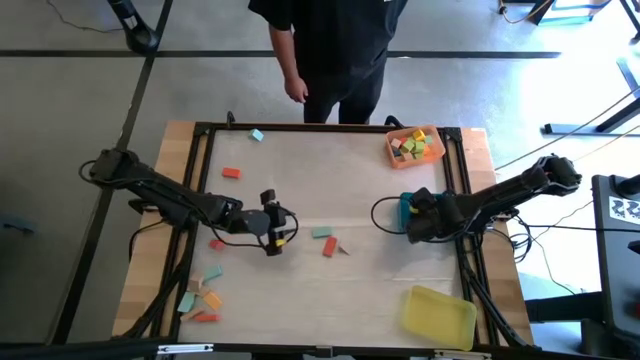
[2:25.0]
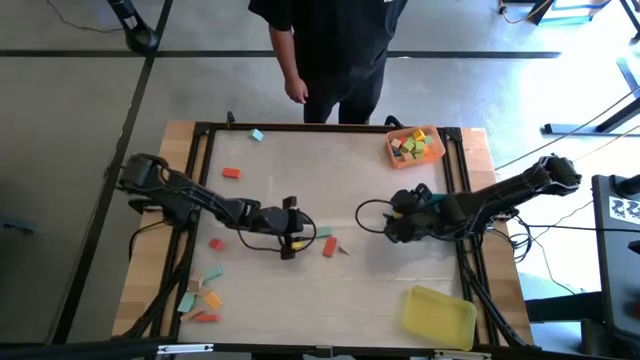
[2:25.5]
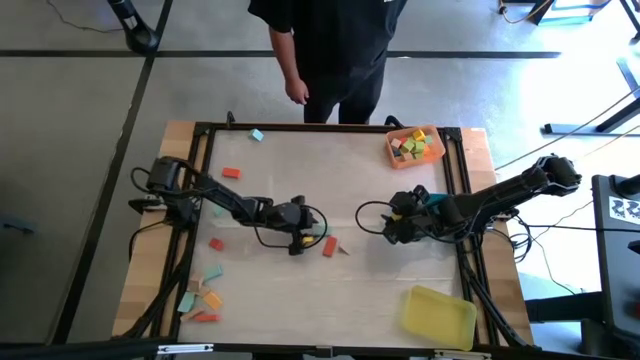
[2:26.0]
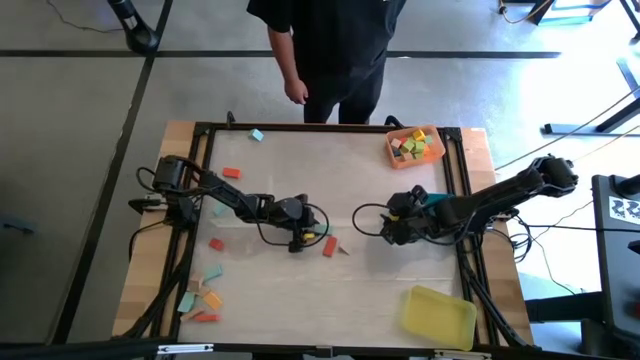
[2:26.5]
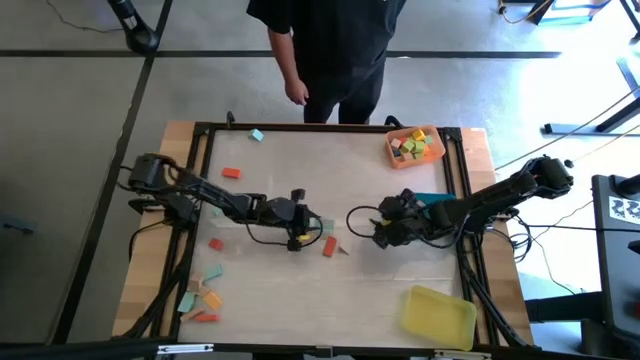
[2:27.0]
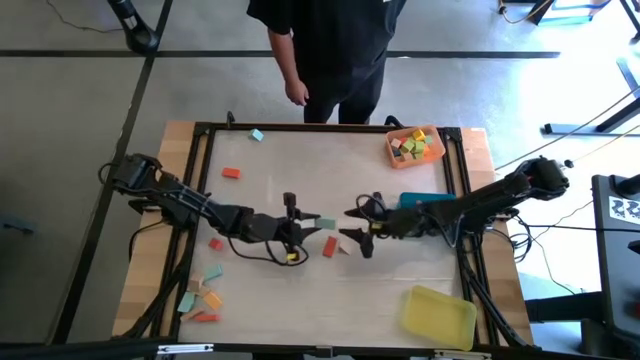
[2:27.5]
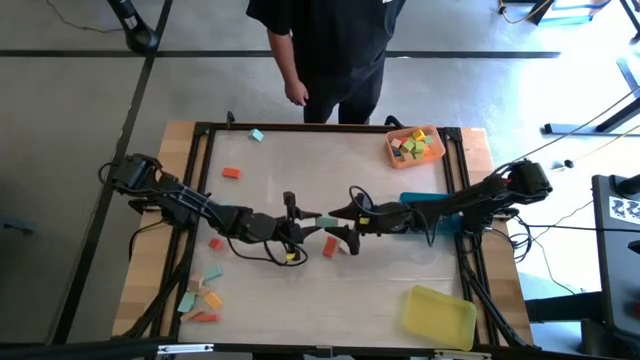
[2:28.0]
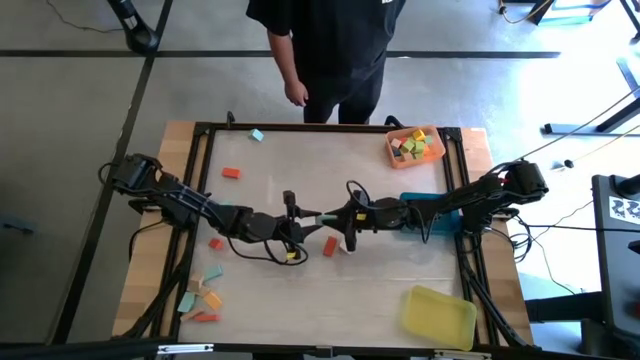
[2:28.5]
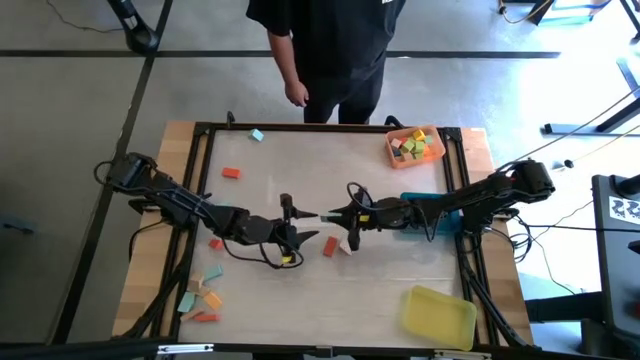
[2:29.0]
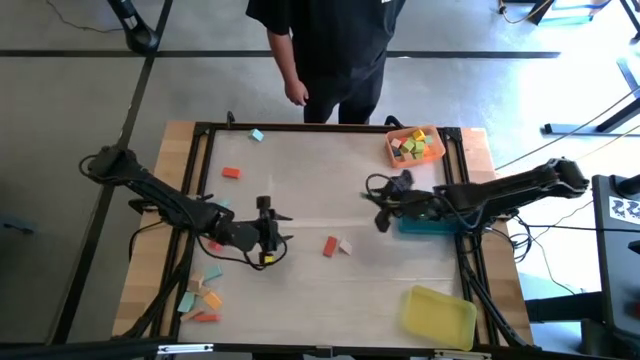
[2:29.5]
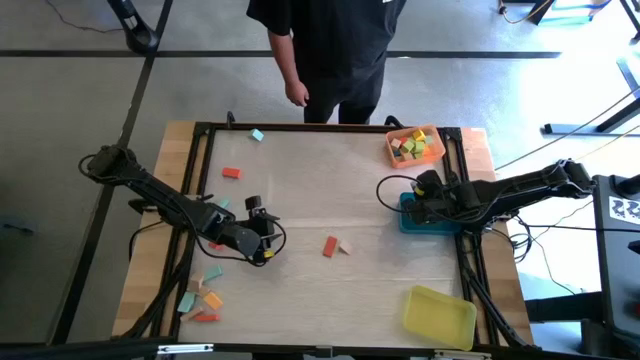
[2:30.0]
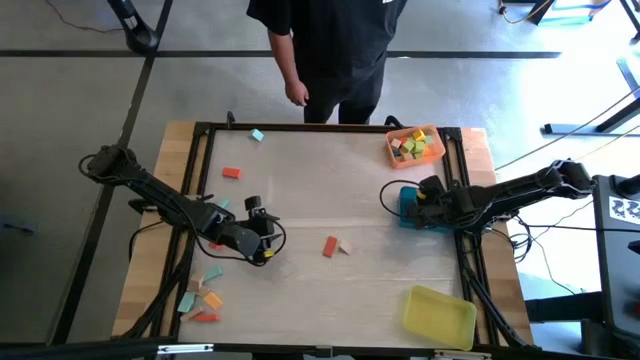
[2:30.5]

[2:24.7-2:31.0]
Task: Sort blocks by size
Put the light blue rectangular block into the blue bin

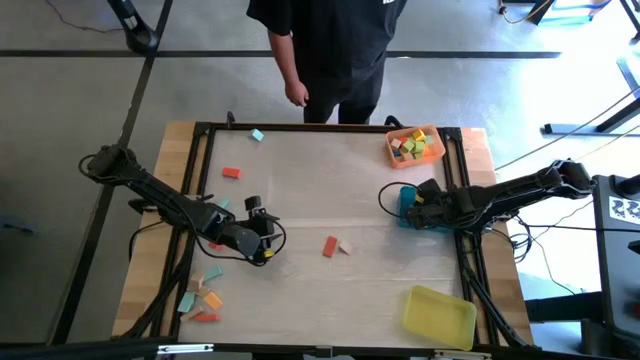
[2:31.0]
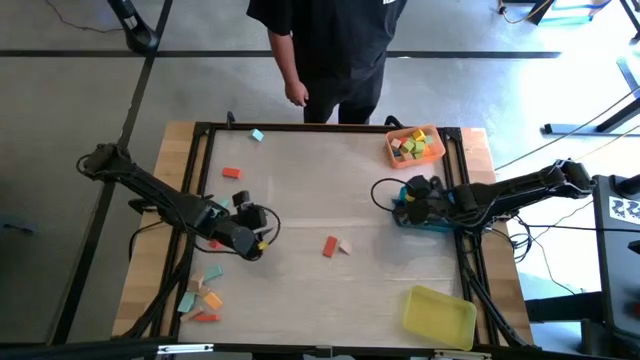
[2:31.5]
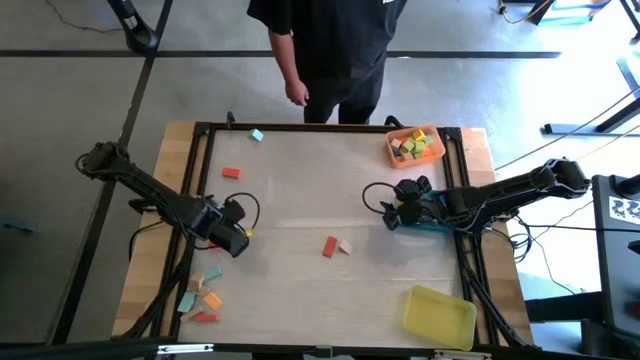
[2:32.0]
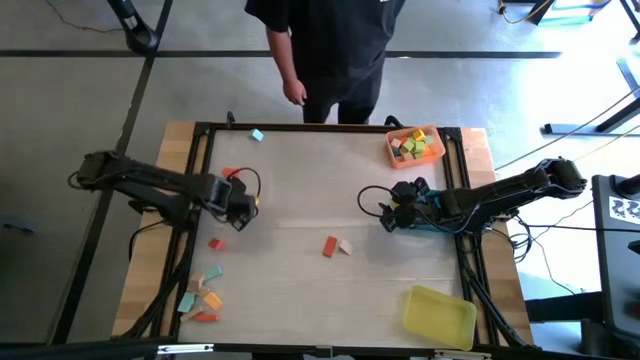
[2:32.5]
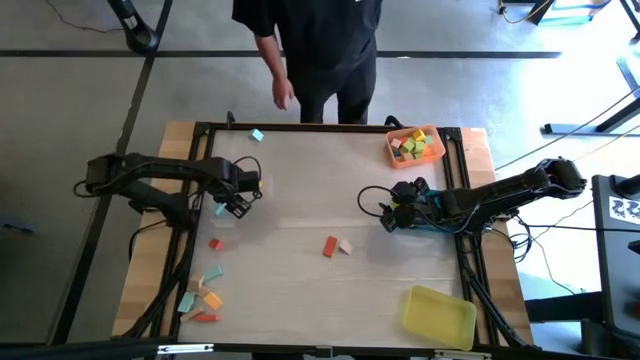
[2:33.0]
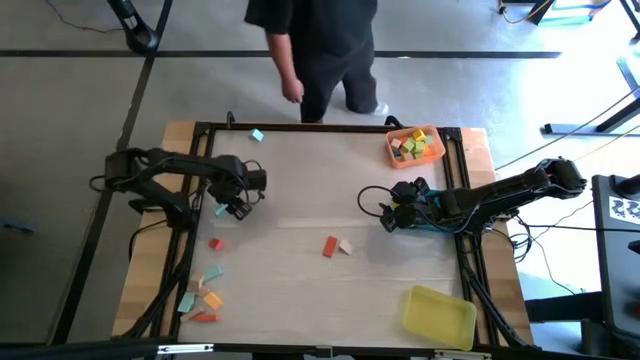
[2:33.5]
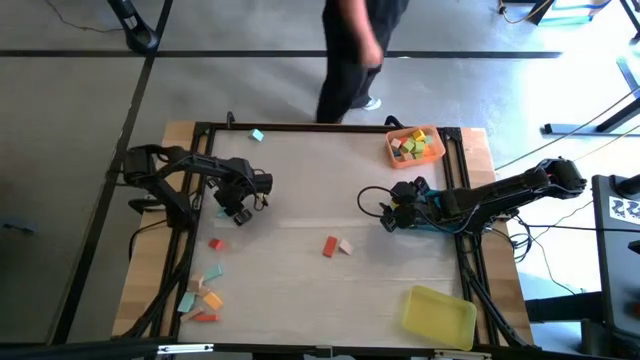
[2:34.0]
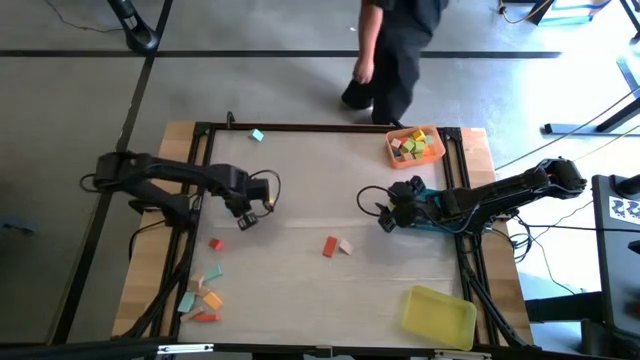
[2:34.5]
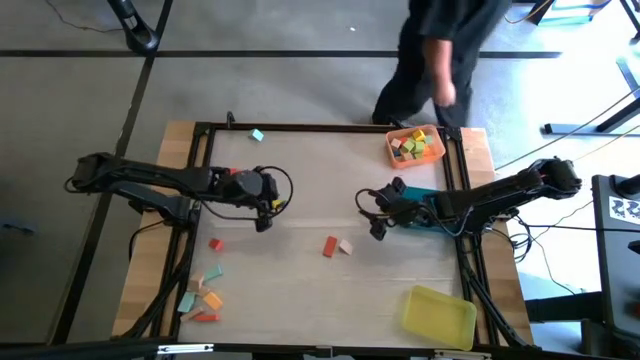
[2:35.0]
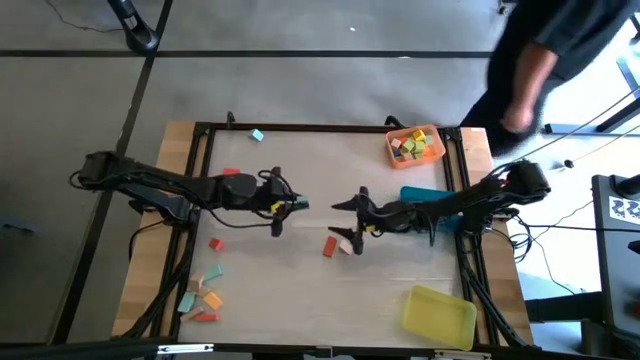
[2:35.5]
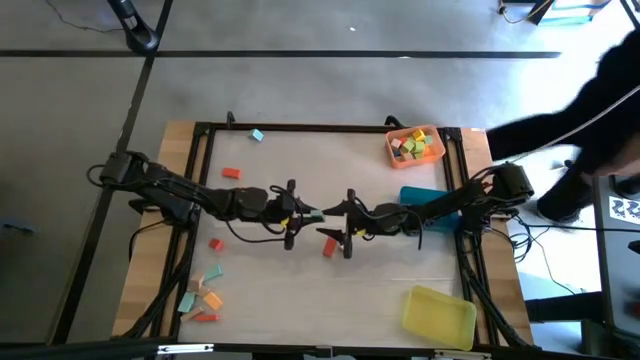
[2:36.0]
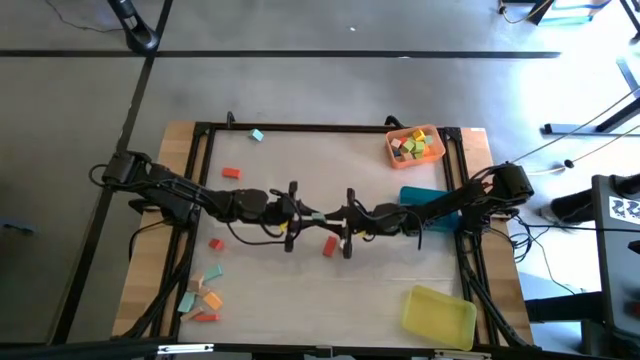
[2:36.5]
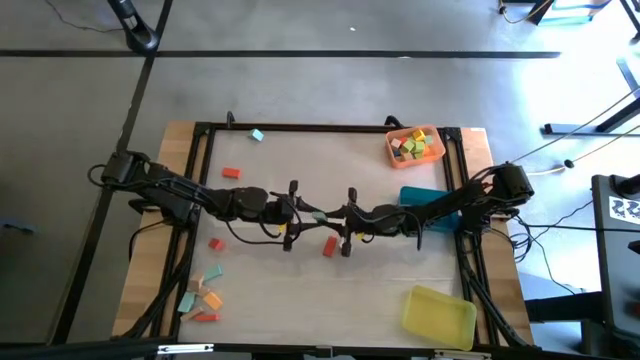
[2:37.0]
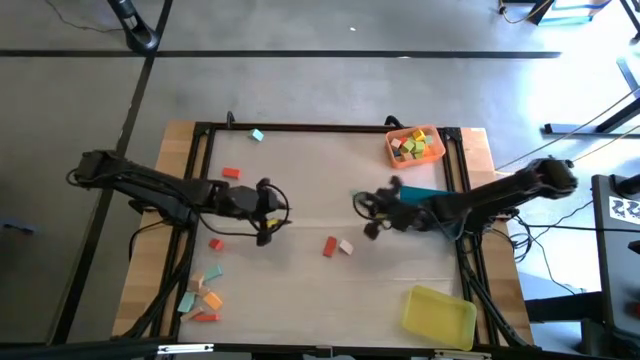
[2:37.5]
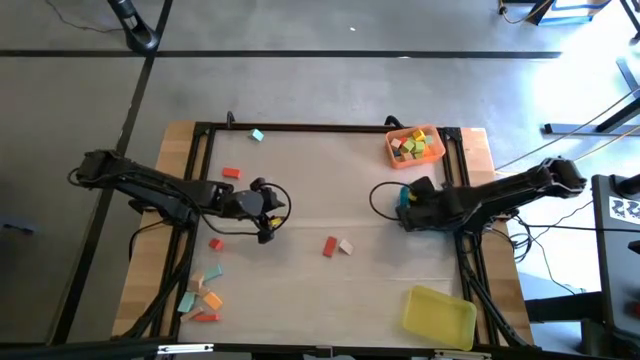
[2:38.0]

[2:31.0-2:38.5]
Put the light blue rectangular block into the blue bin

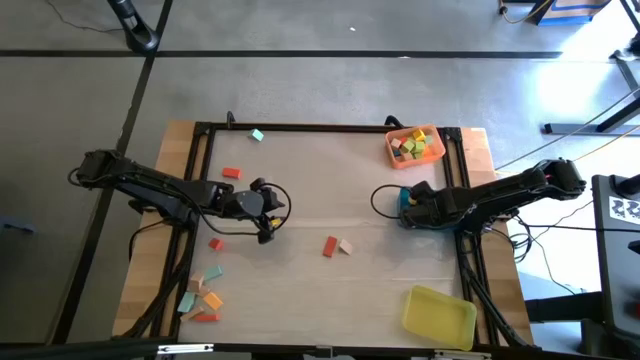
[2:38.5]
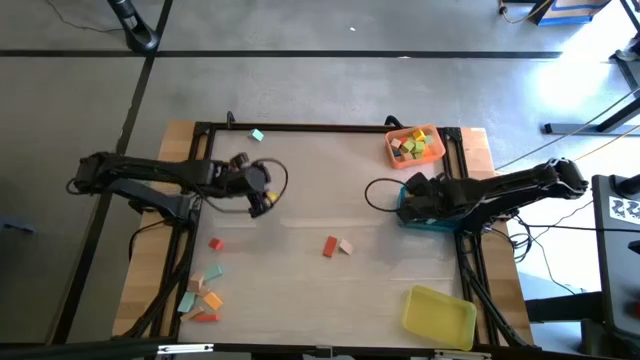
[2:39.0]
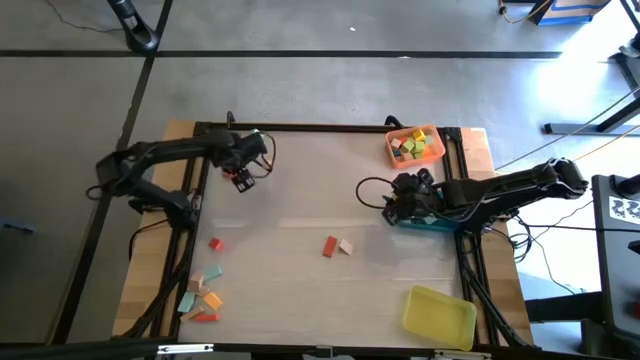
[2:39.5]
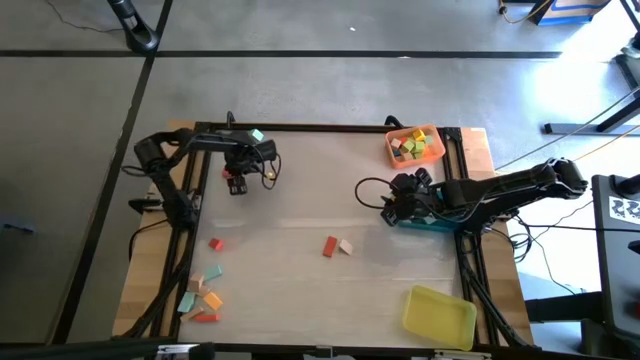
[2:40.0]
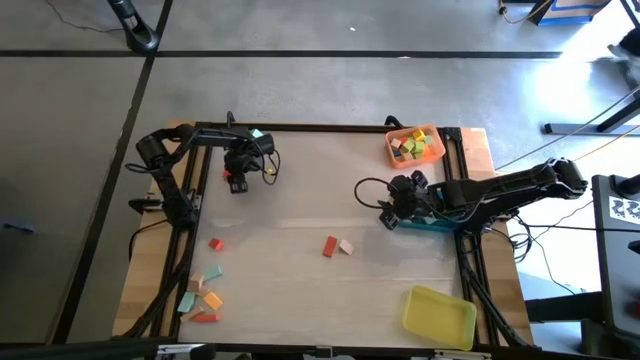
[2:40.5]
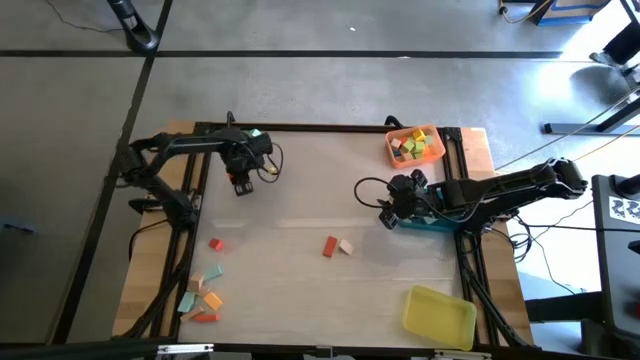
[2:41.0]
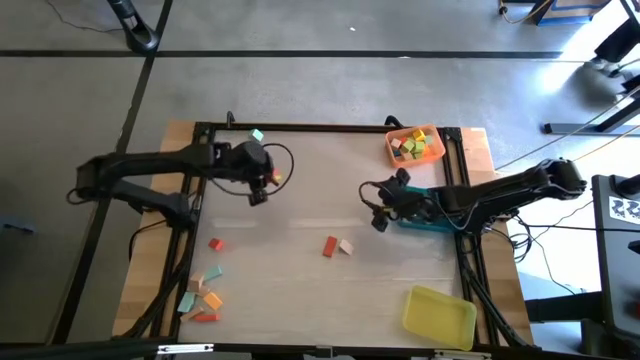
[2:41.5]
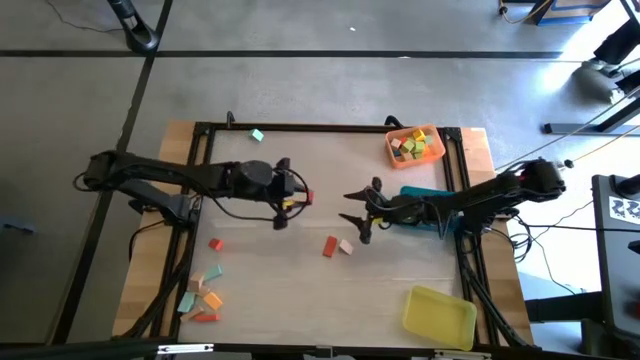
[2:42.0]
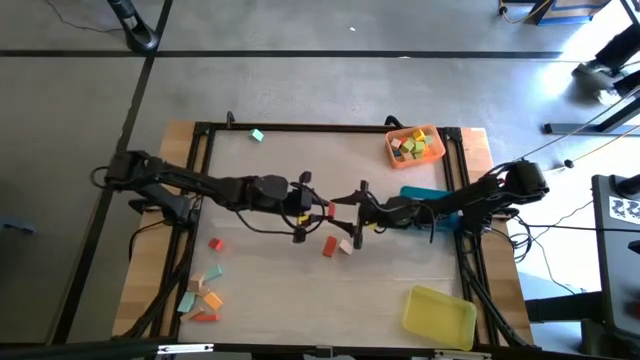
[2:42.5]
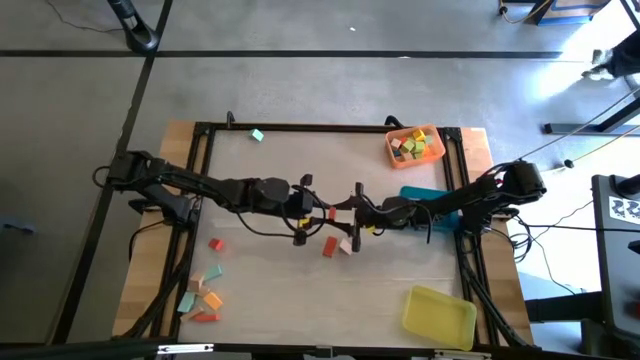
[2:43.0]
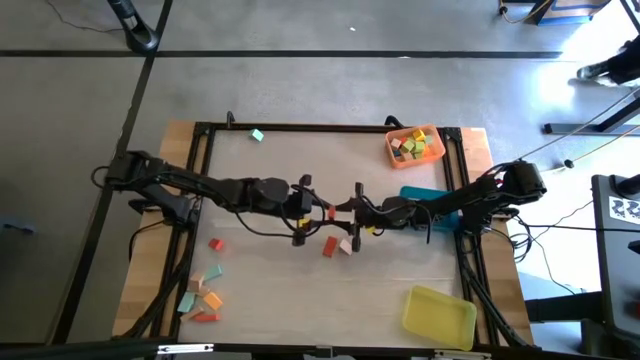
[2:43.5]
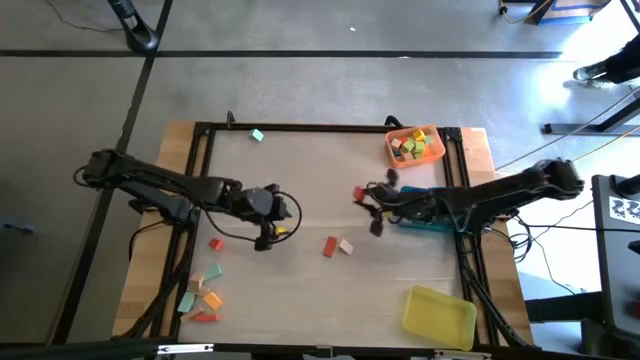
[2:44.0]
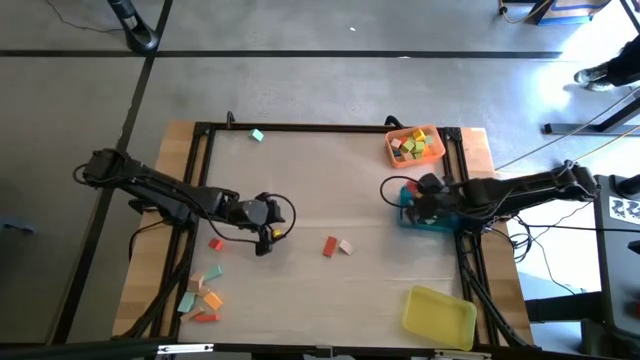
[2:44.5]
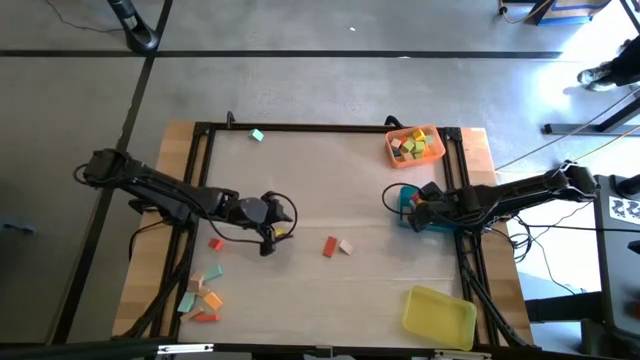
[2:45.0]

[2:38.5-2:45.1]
Put the orange rectangular block into the blue bin

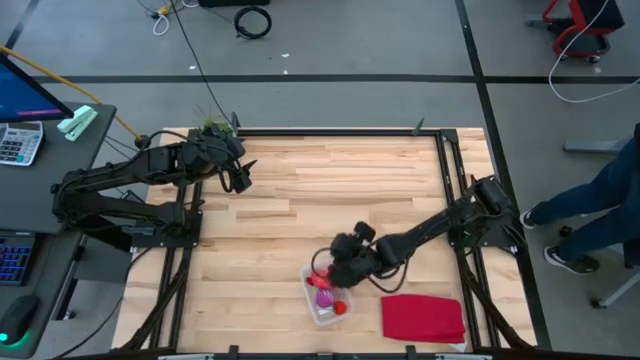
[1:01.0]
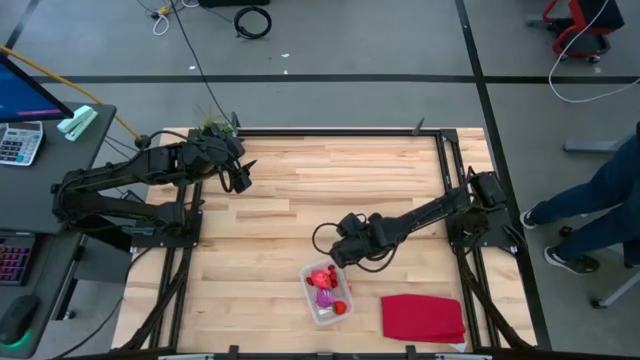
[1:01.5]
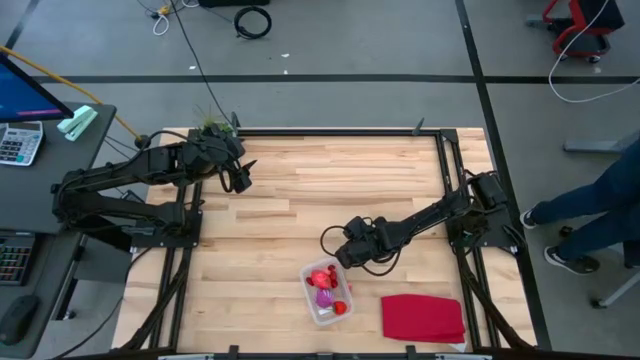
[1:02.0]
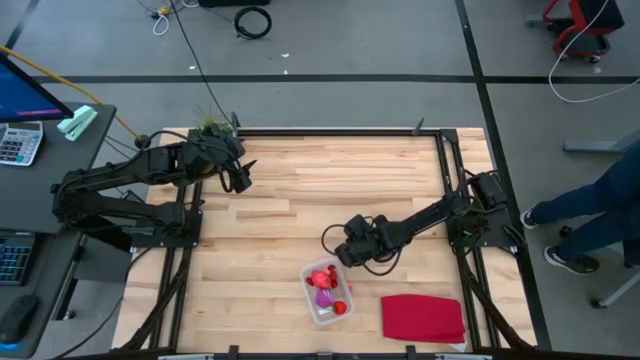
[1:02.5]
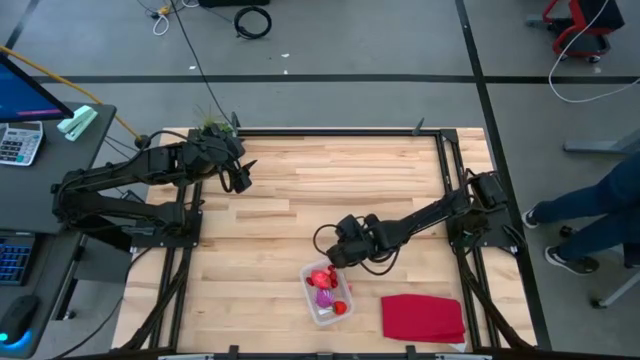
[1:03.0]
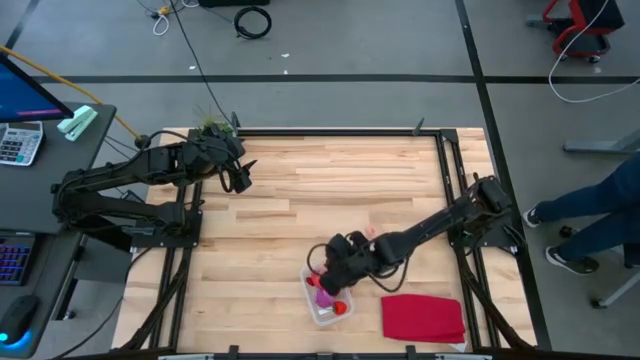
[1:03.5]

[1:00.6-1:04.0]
Task: Pick and placing Produce into tupperware
Put the red cherry into the transparent bin
